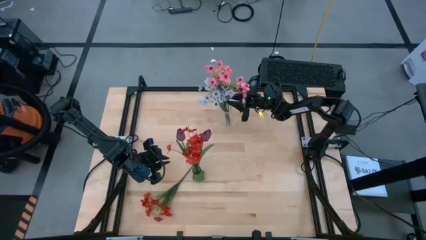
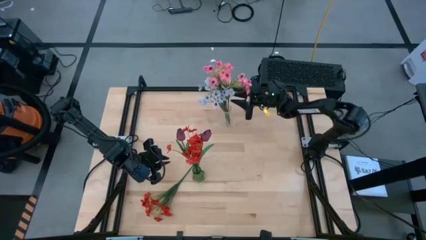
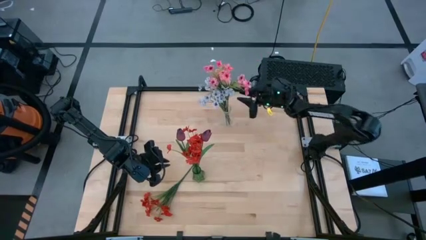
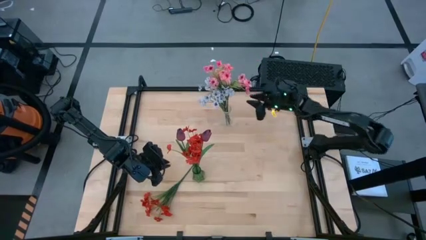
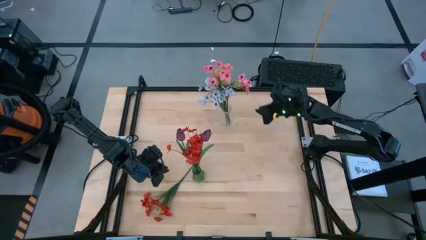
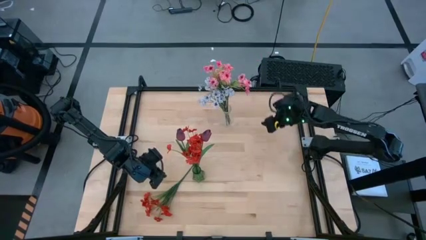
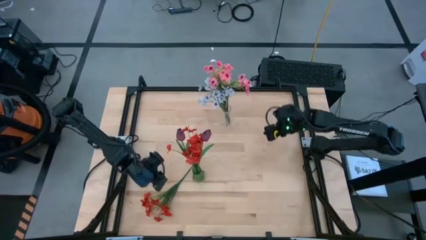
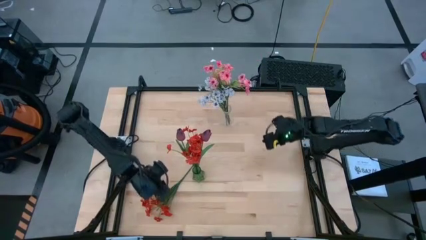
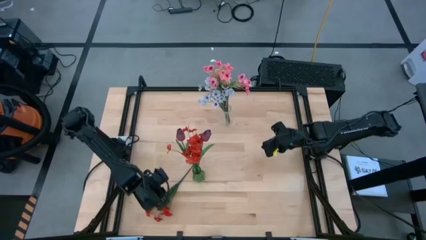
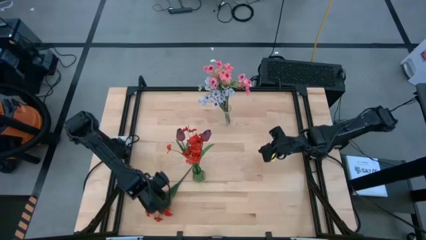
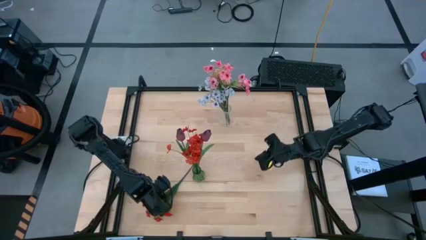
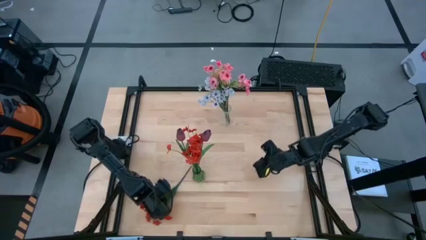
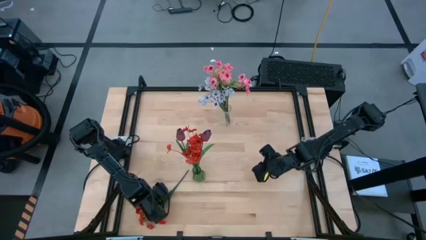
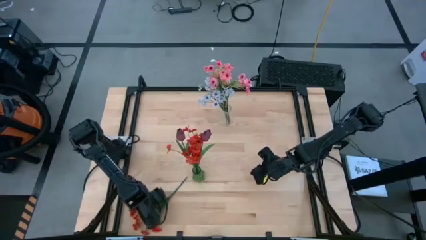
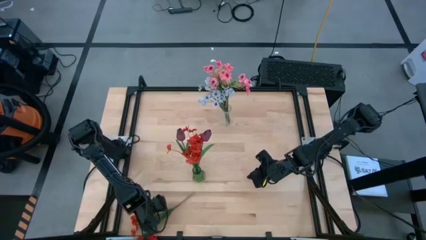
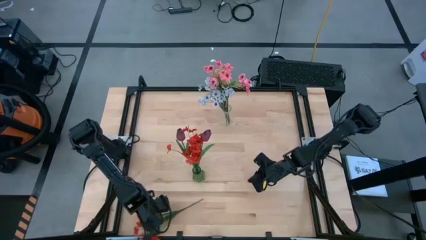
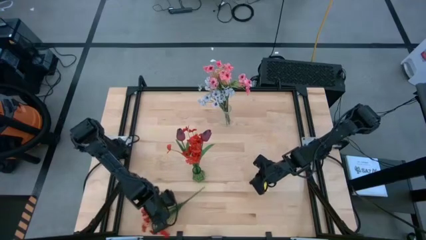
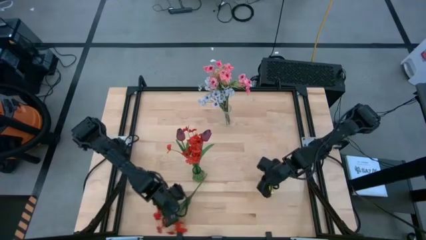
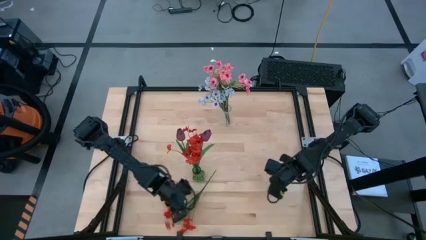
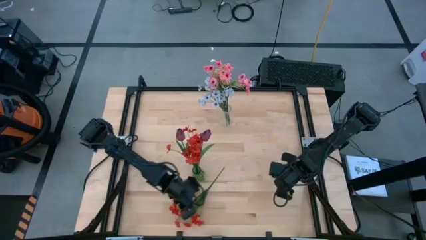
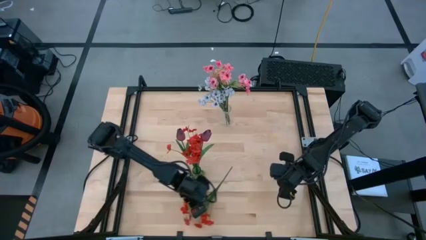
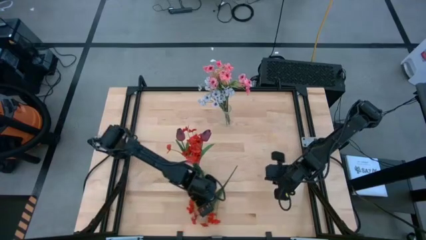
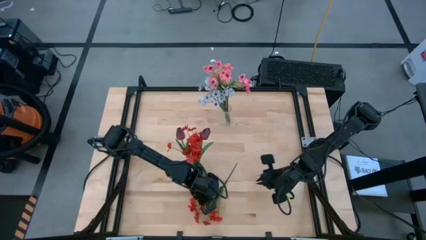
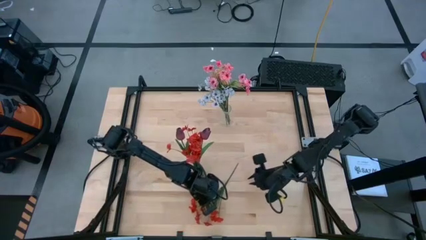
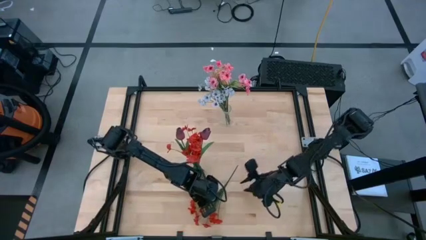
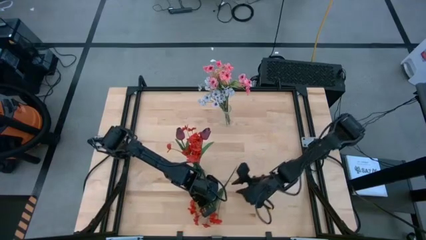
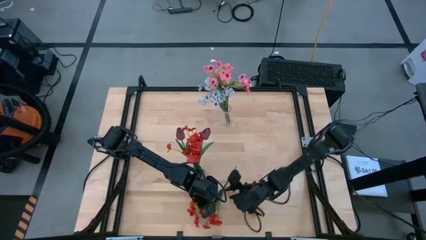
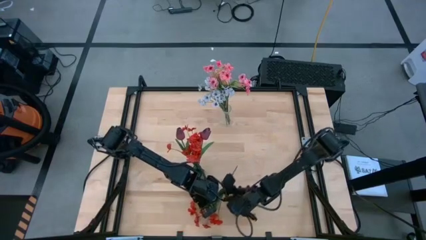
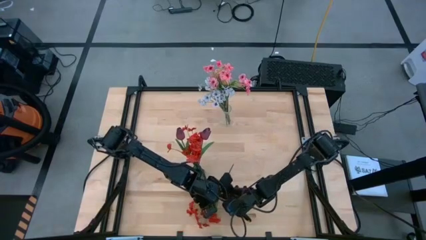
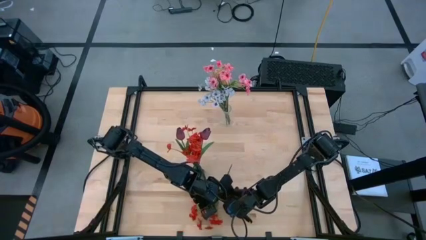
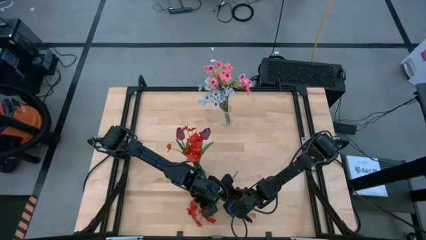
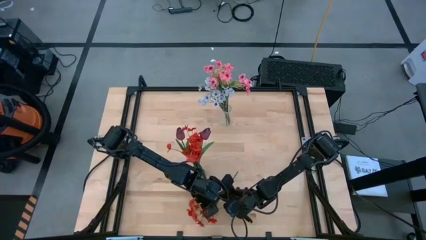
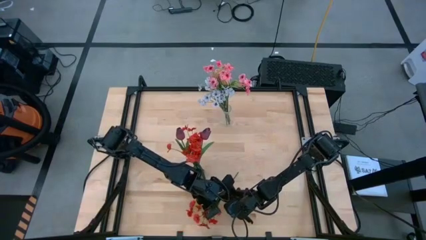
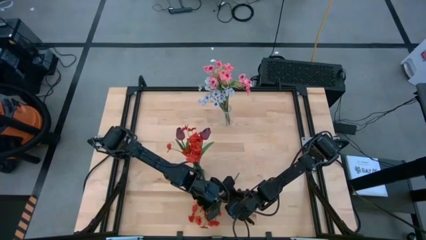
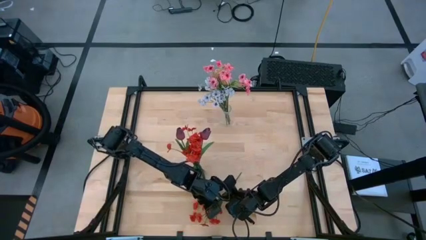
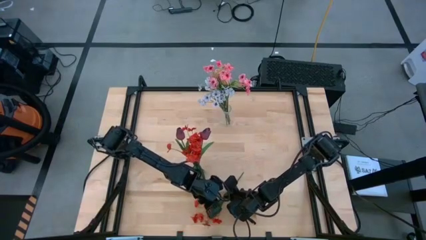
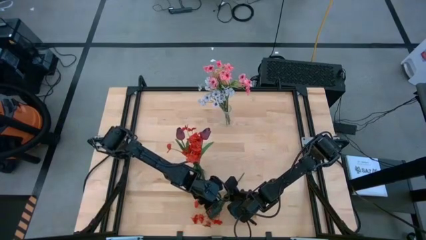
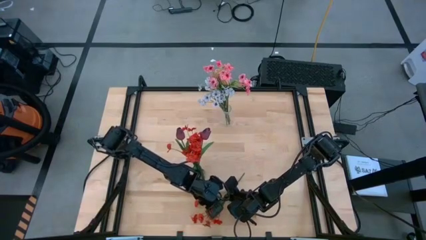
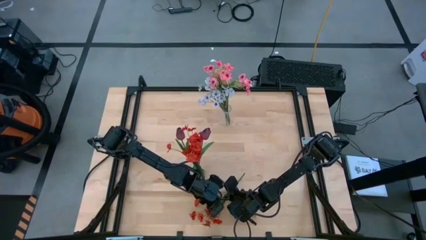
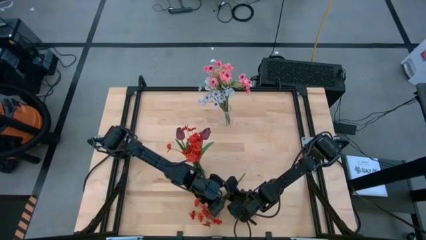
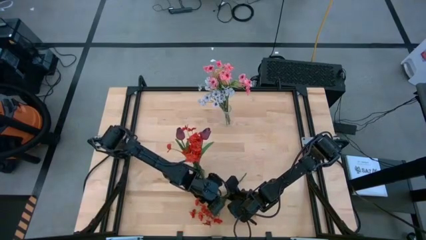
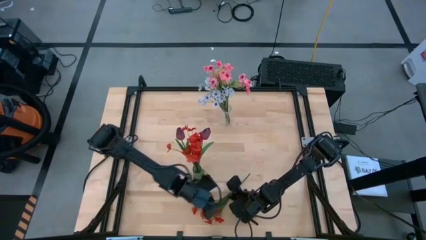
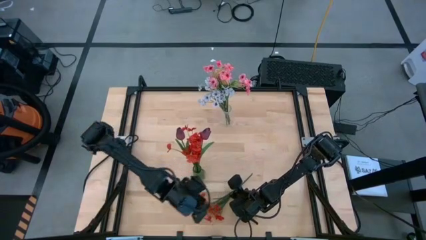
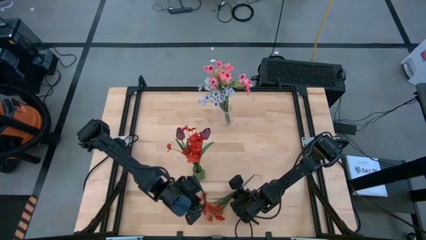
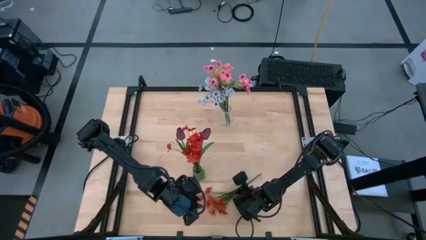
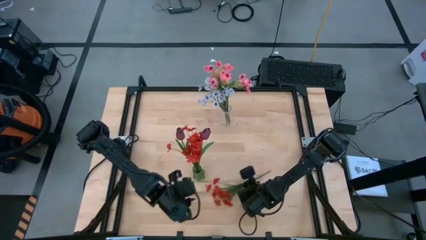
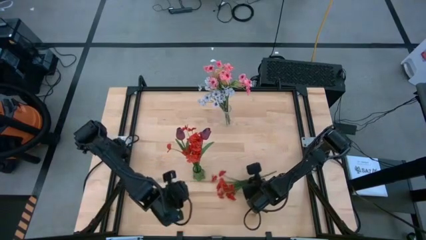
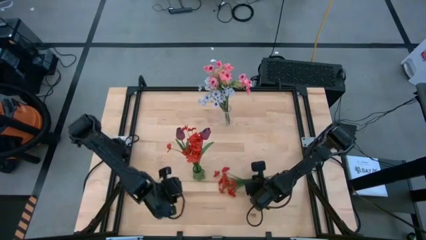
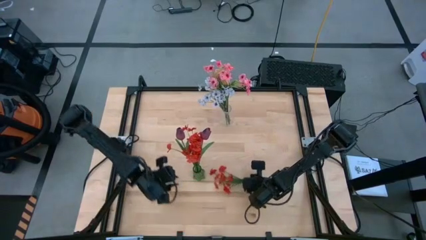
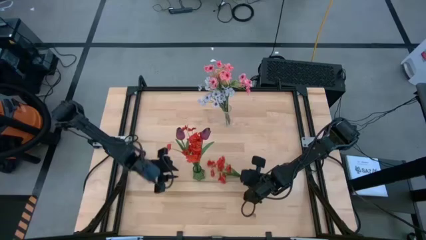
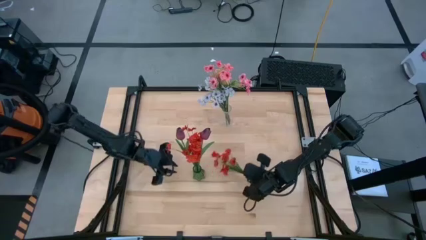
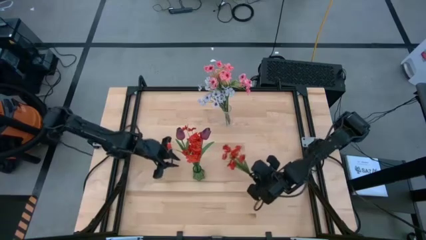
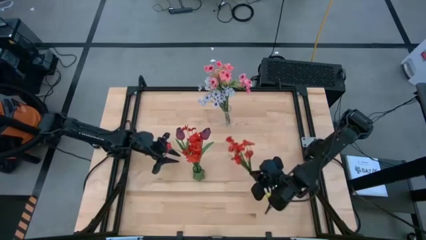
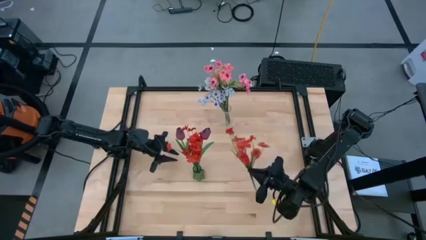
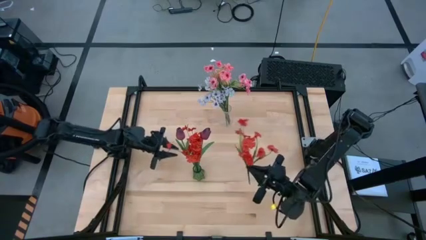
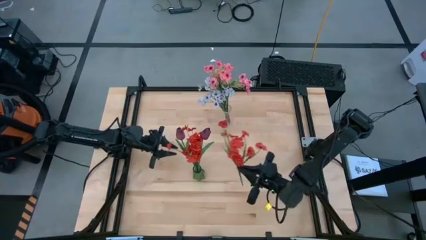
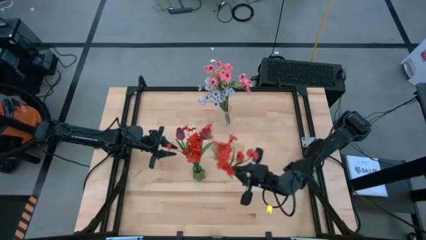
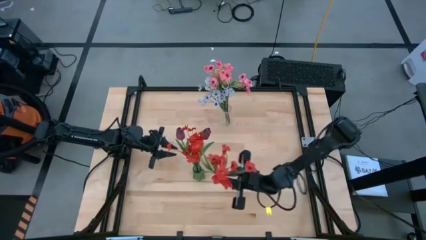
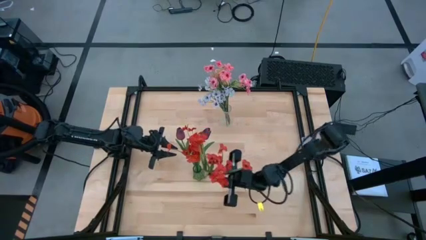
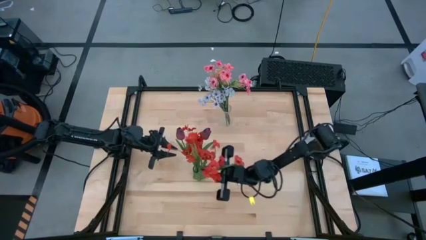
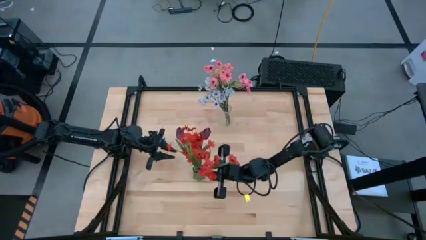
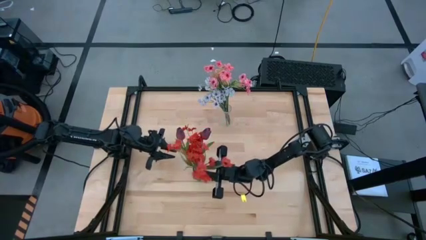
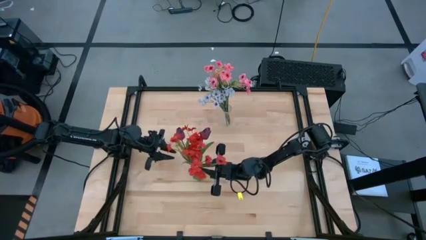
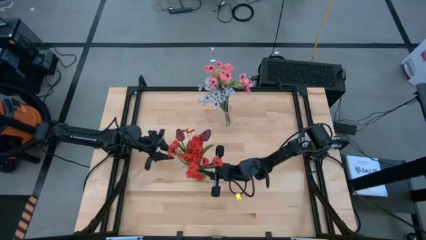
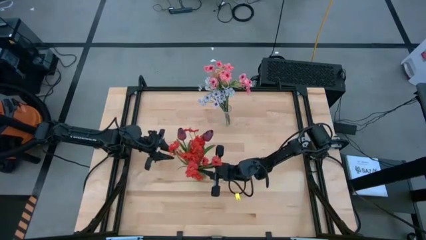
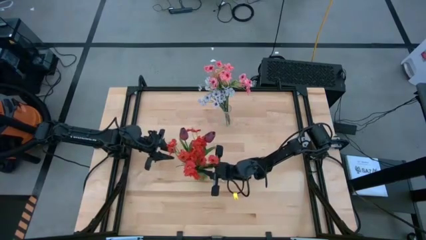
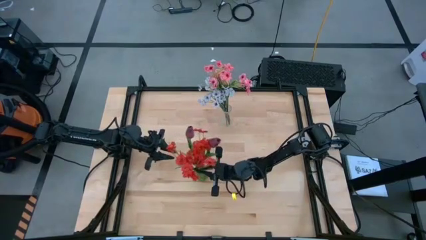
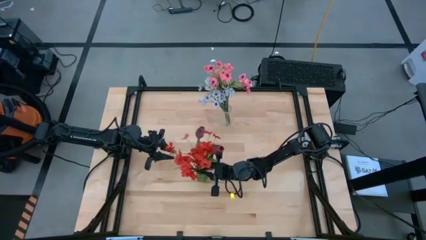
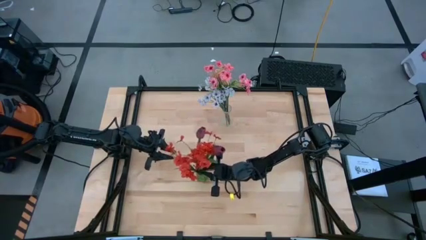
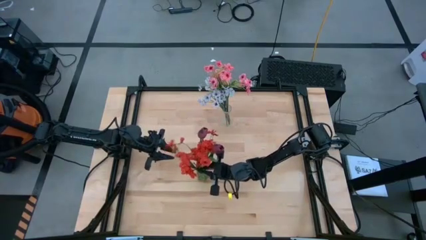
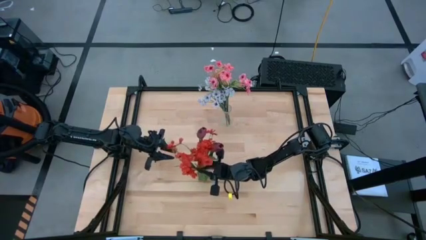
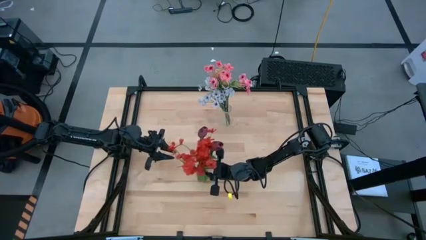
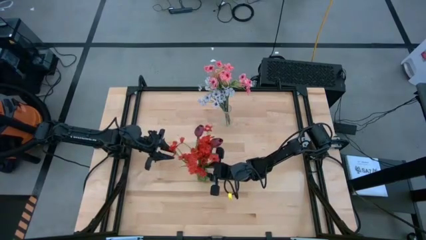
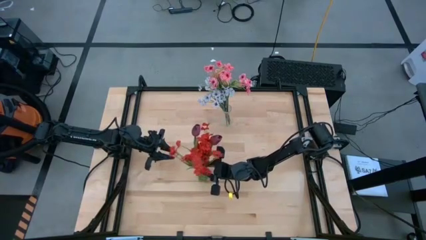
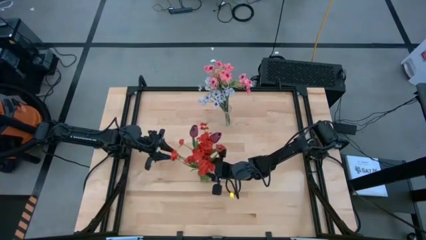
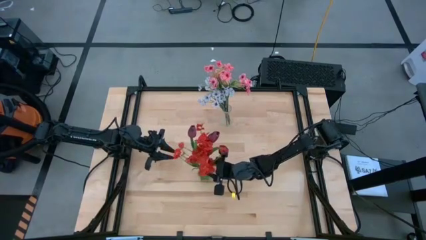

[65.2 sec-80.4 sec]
Task: Sort flowers into vase by color
Put the orange flowers into the green flower vase
